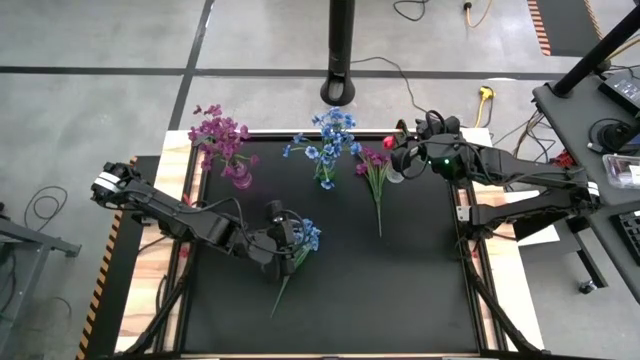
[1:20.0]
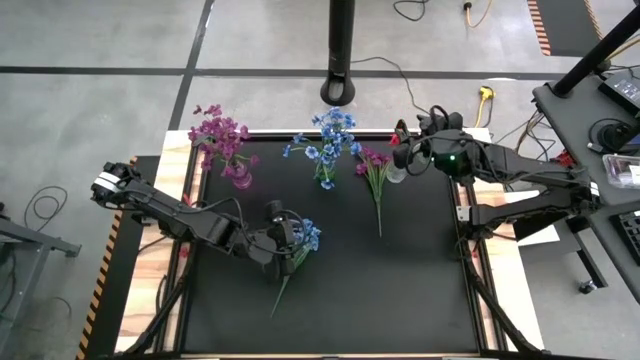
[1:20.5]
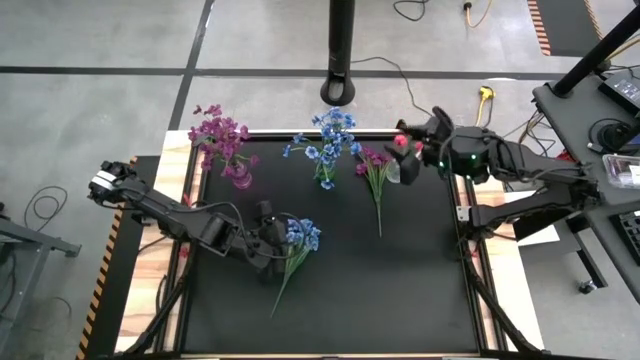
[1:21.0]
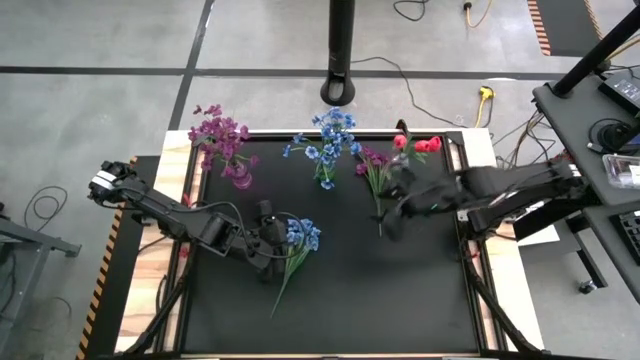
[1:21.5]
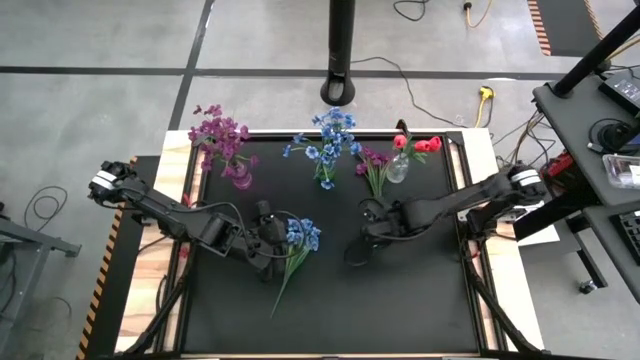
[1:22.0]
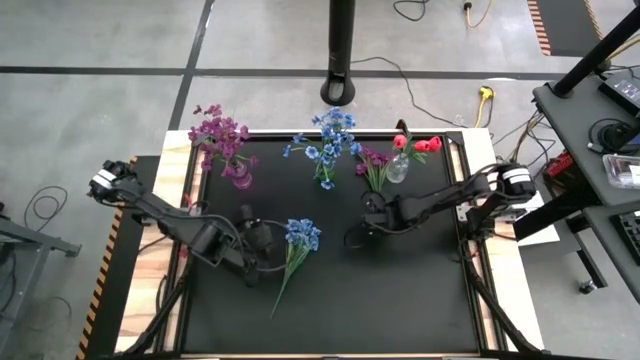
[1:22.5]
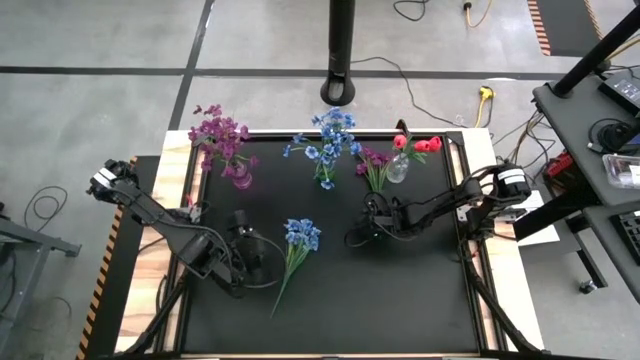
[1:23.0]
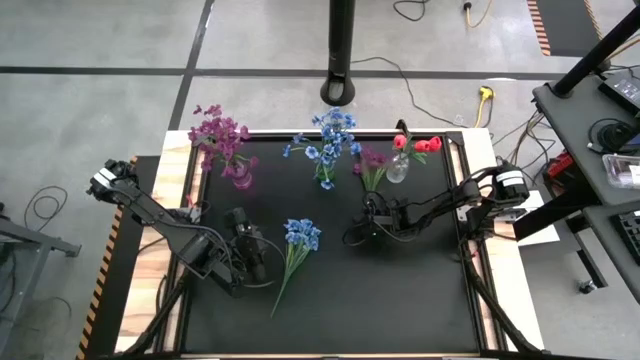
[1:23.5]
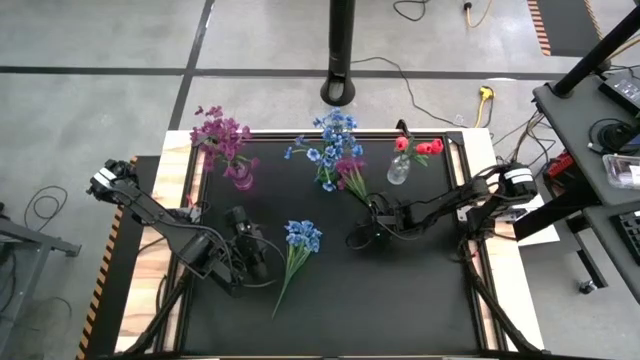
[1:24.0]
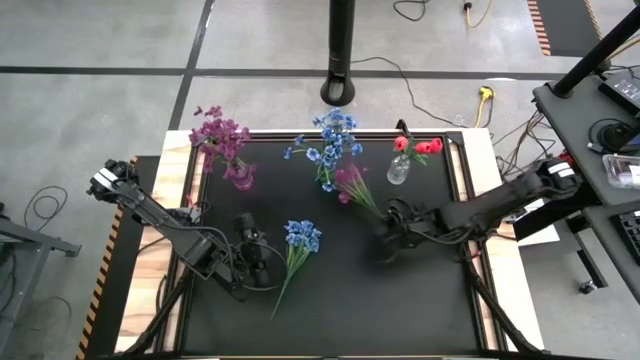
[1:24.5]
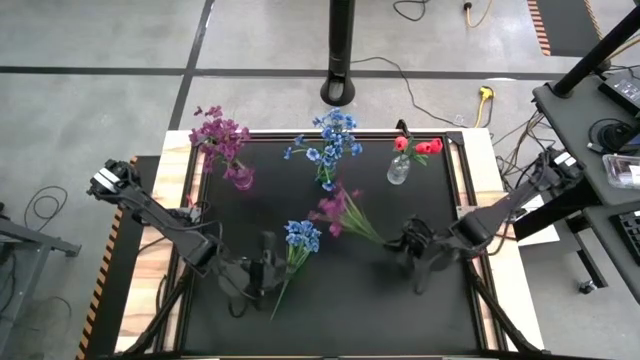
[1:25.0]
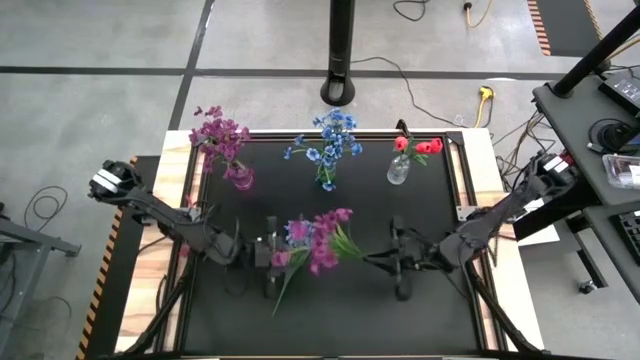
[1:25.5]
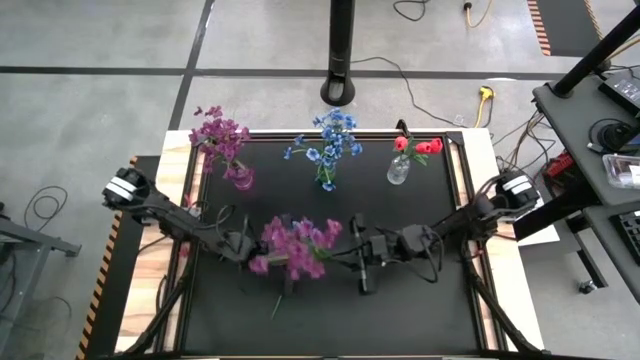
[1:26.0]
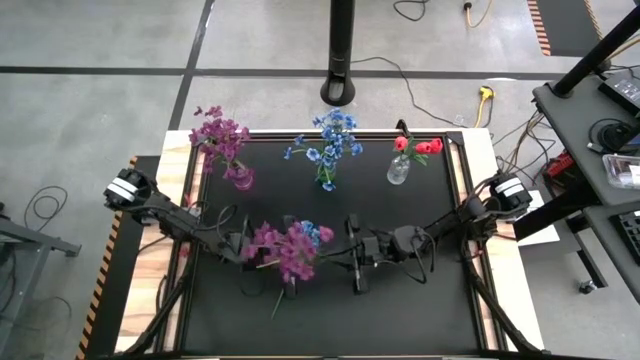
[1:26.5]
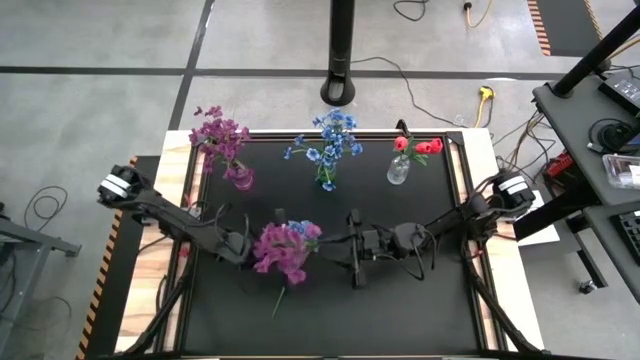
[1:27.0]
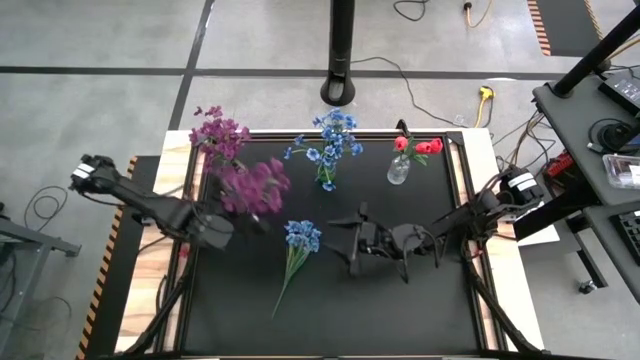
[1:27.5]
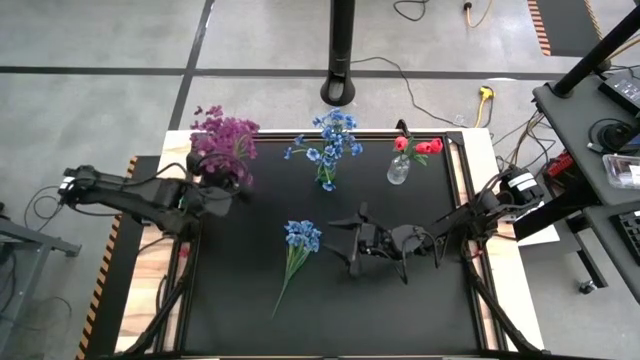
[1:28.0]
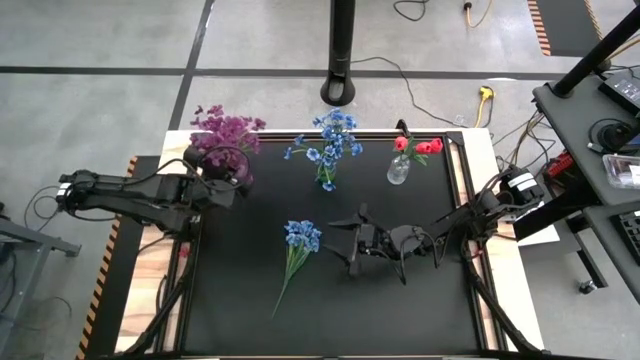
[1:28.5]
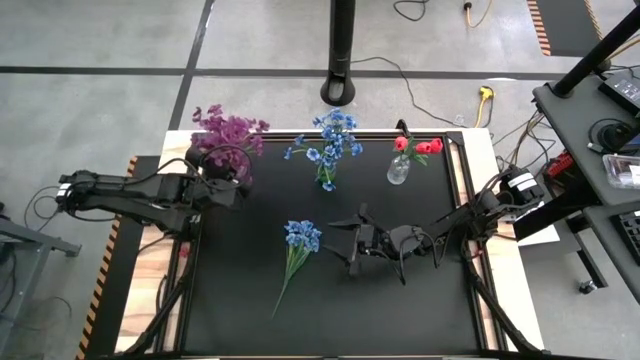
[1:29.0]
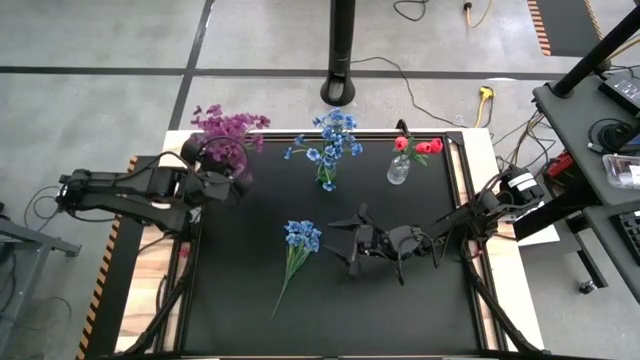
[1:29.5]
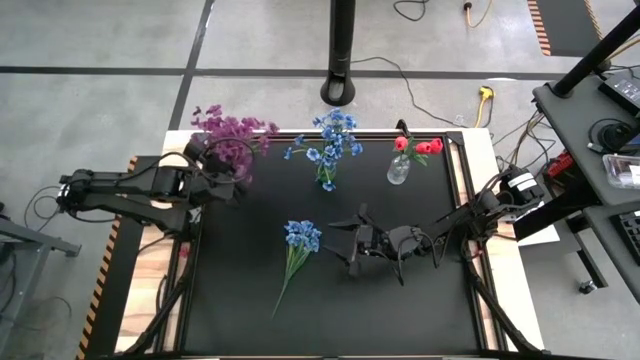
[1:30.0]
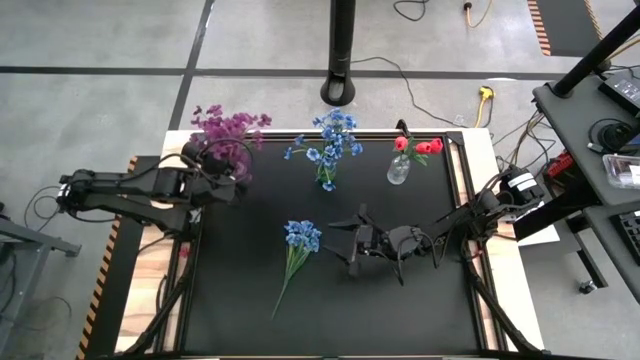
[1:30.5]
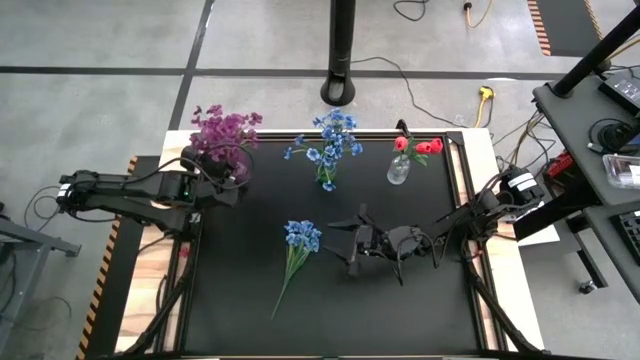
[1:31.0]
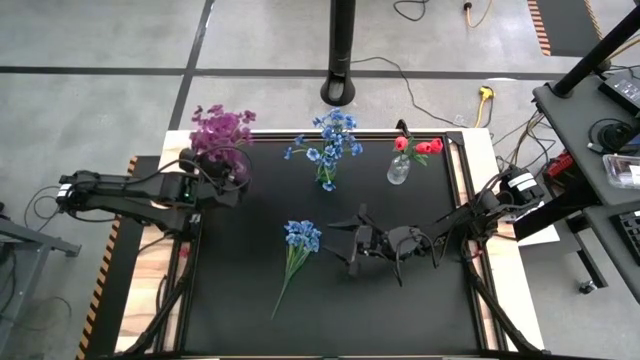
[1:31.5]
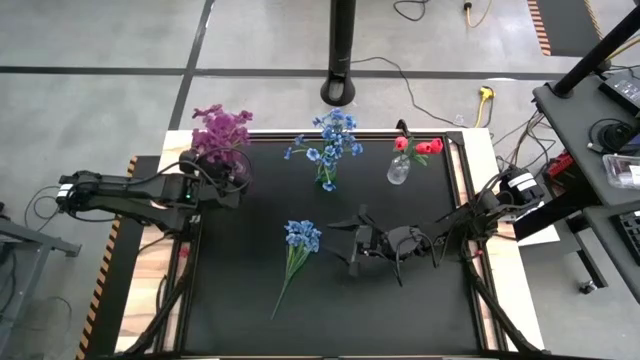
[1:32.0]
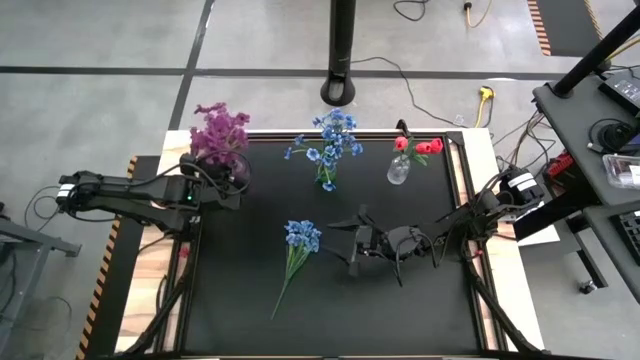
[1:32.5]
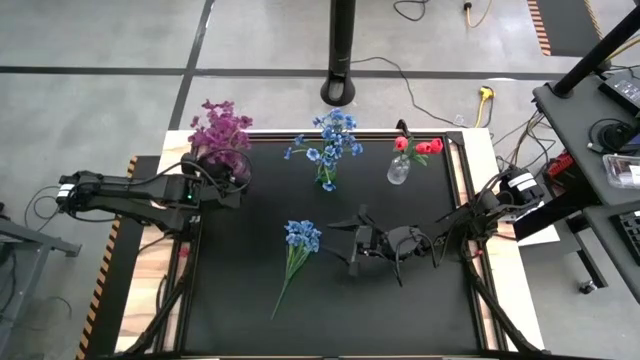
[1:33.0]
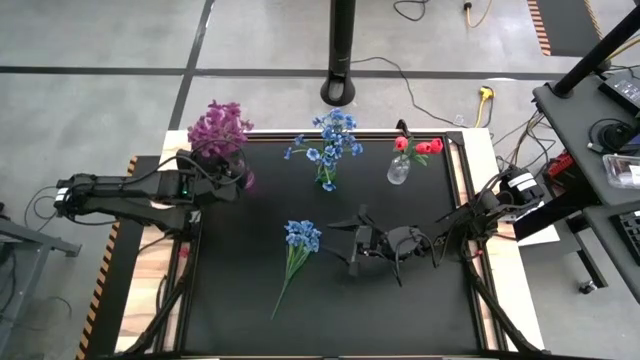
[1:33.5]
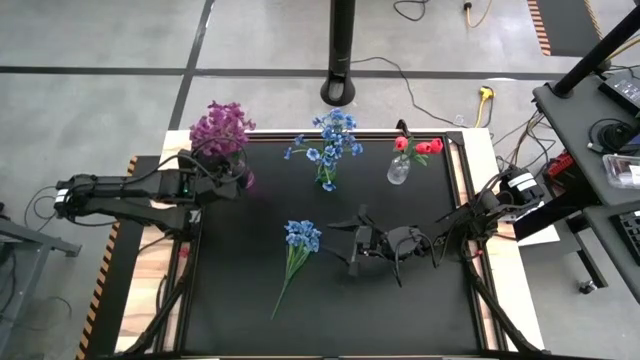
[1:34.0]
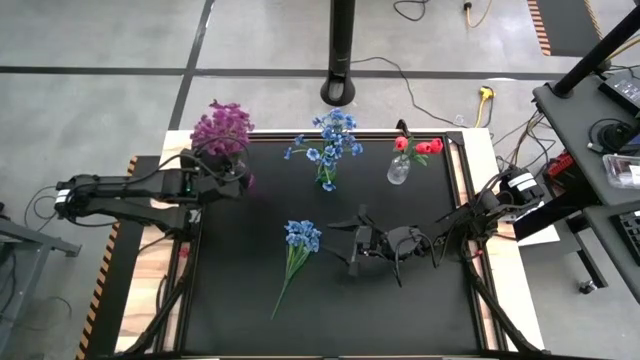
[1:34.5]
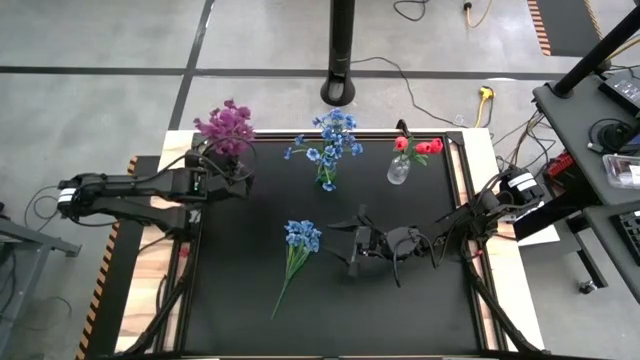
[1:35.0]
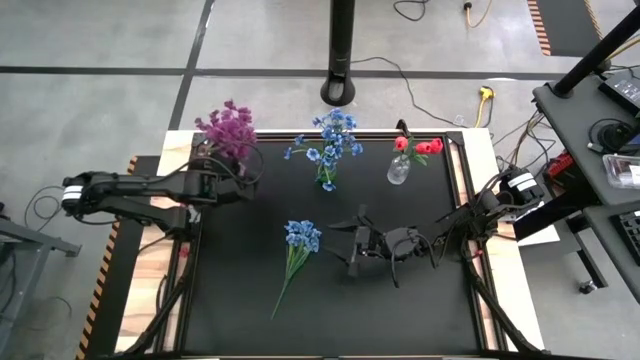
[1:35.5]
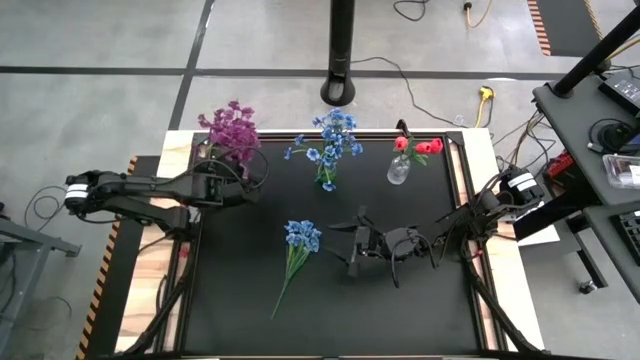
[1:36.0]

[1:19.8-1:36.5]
Task: Sort flowers into vase by color
Put the violet flowers into the violet vase

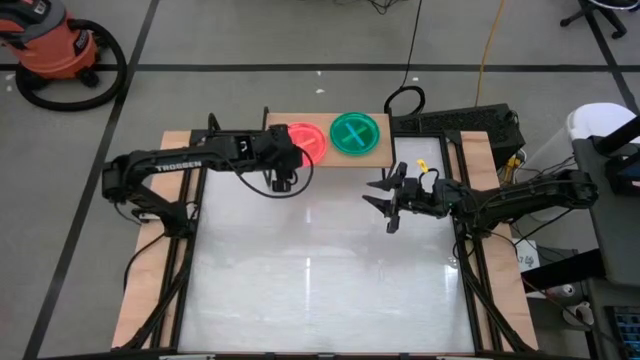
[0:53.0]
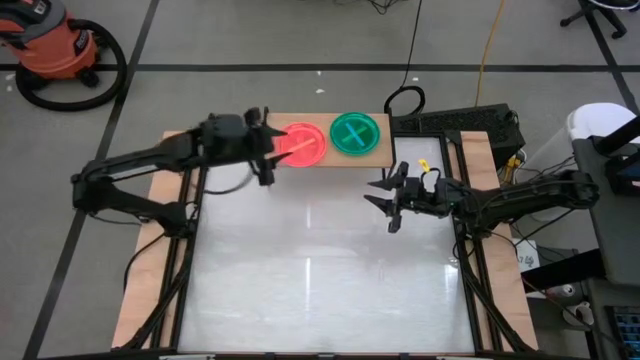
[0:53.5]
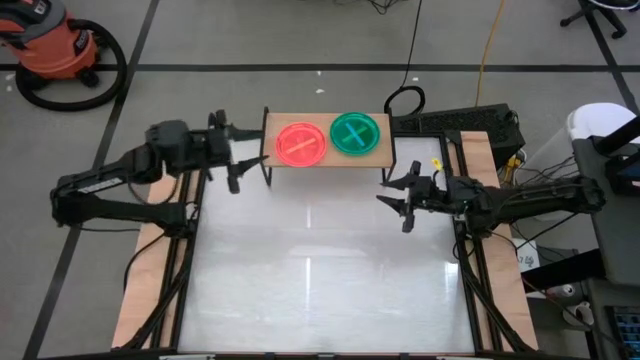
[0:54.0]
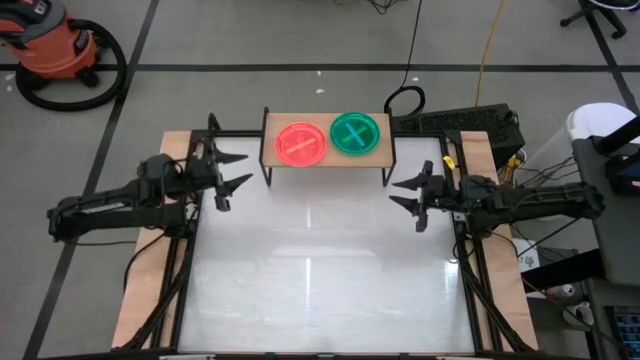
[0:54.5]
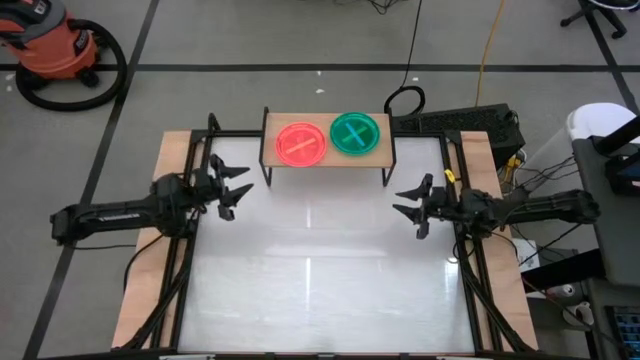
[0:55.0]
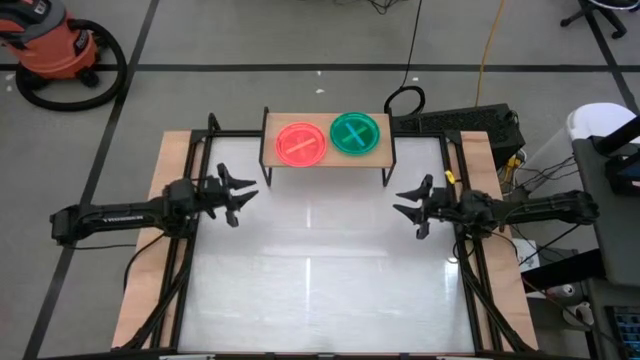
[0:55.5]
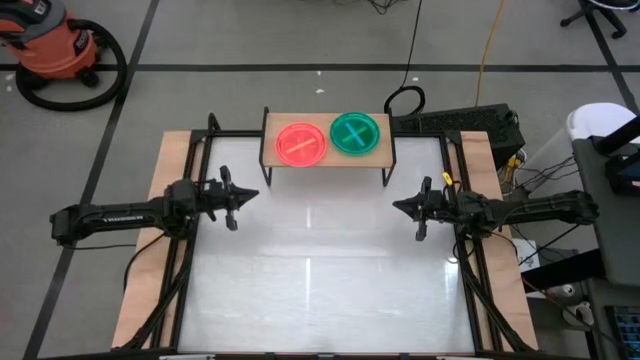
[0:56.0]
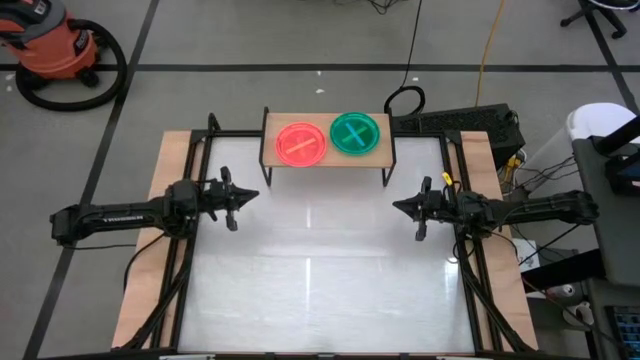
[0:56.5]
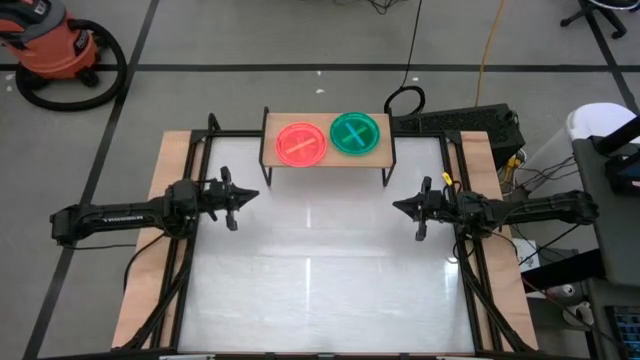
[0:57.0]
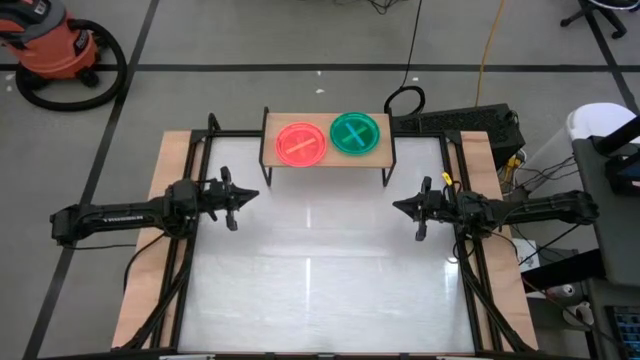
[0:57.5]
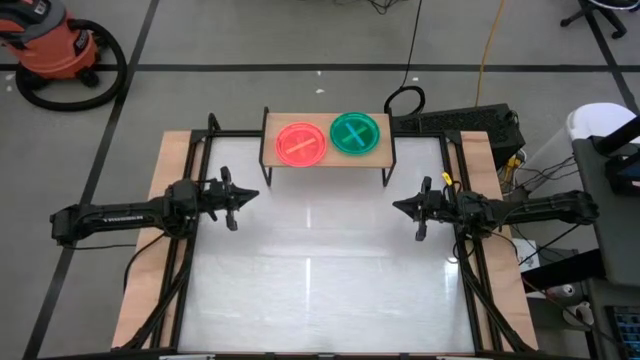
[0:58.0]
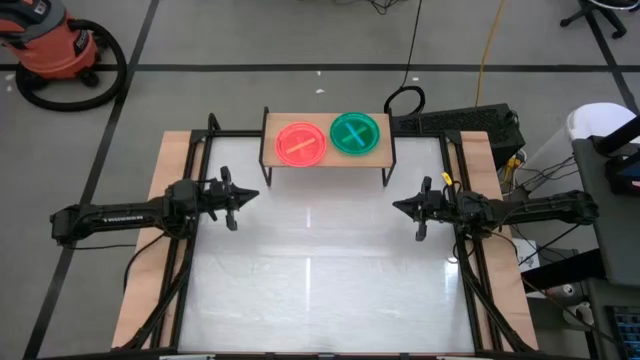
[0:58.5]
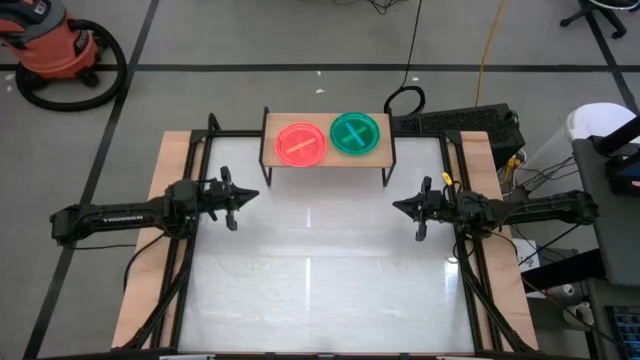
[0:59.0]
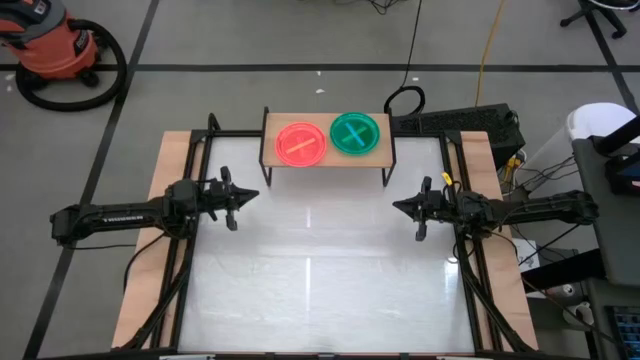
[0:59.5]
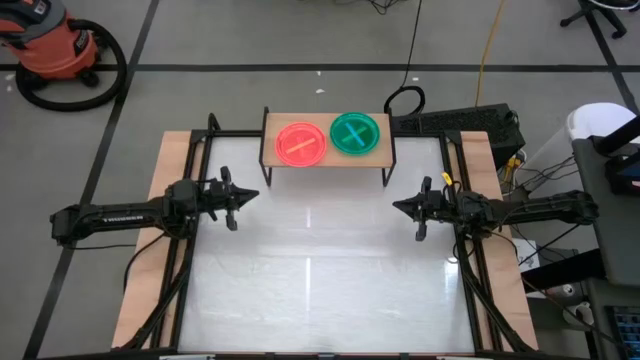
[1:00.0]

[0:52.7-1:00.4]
Task: Place and stack plates onto a shelf
Return to Home Position
